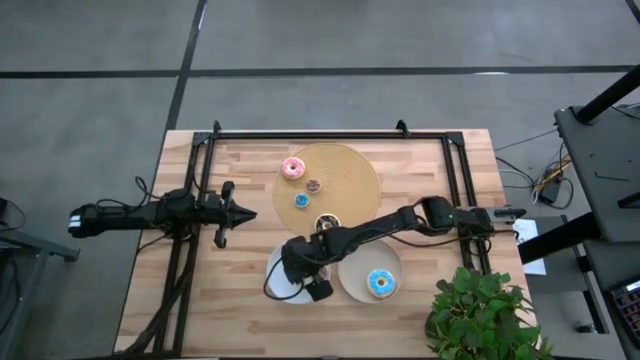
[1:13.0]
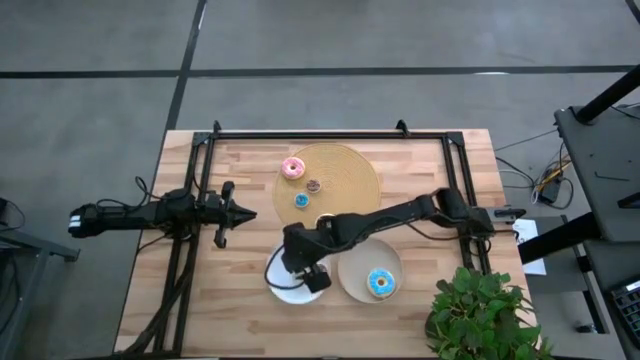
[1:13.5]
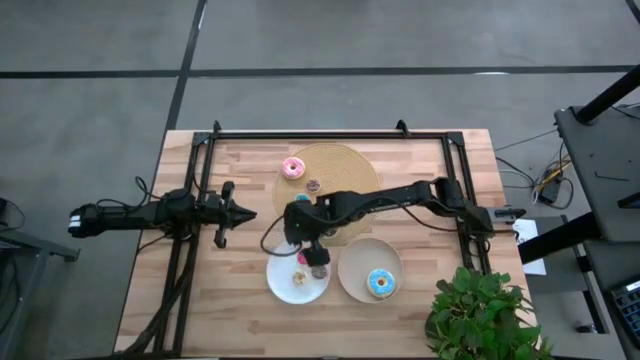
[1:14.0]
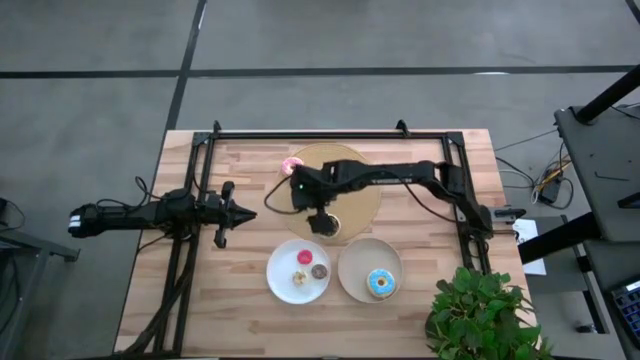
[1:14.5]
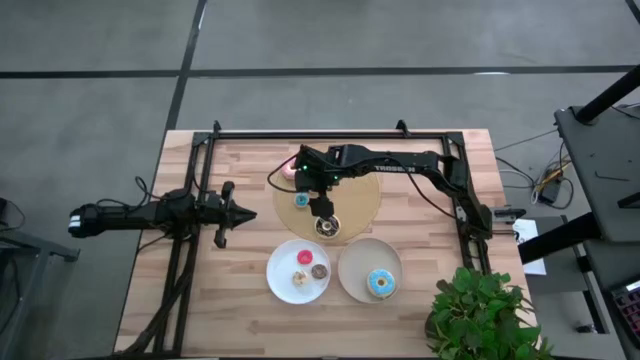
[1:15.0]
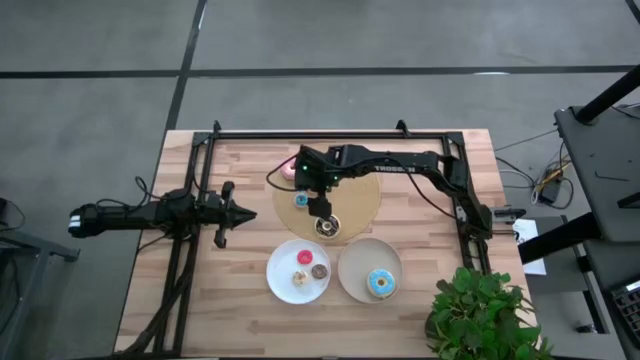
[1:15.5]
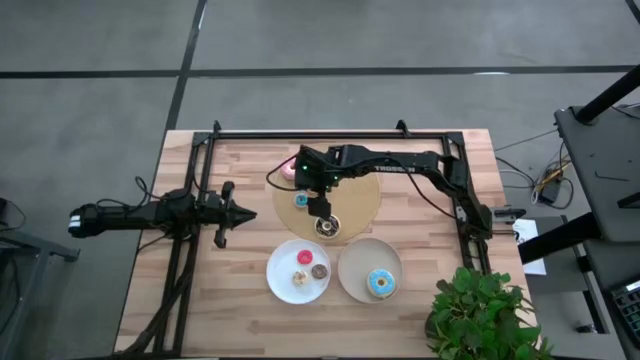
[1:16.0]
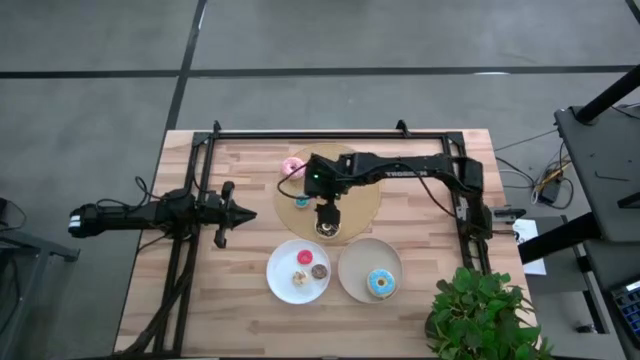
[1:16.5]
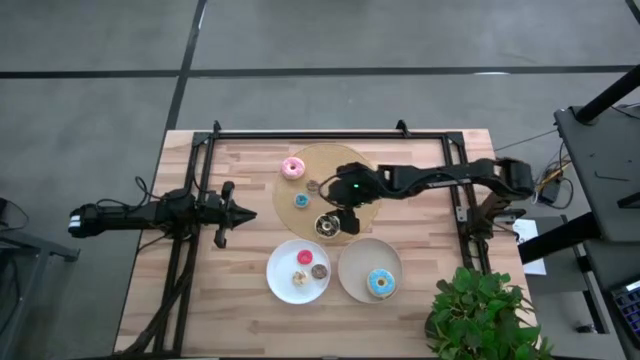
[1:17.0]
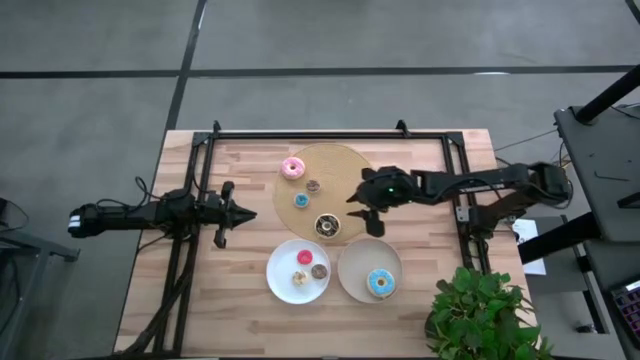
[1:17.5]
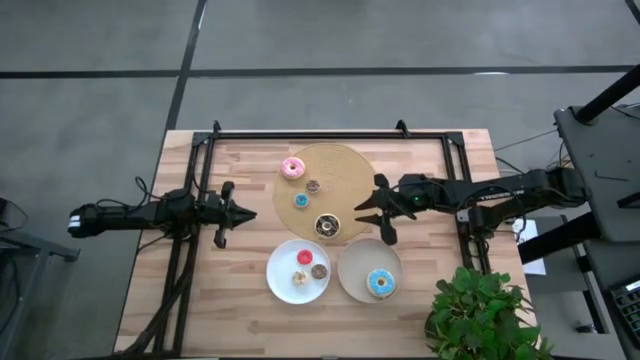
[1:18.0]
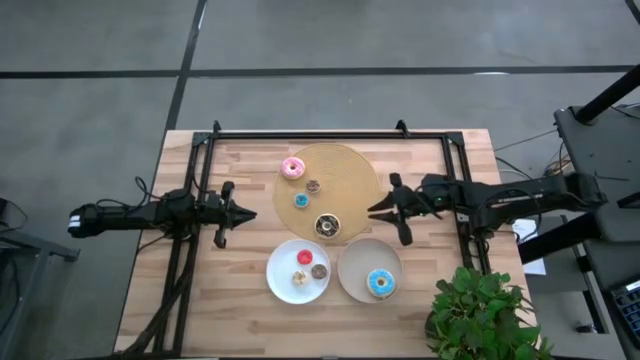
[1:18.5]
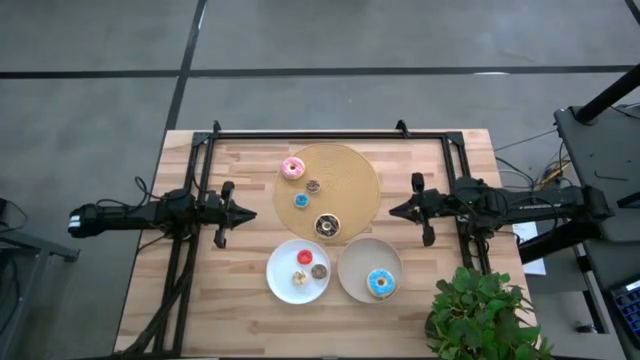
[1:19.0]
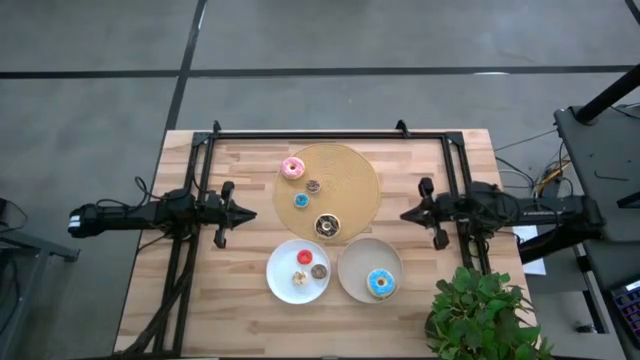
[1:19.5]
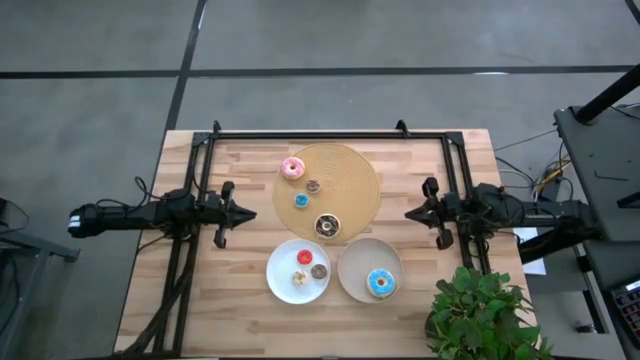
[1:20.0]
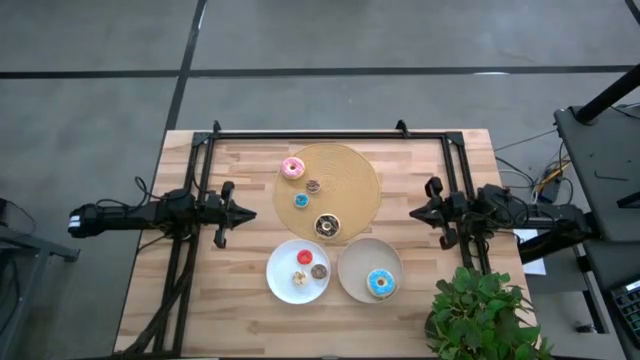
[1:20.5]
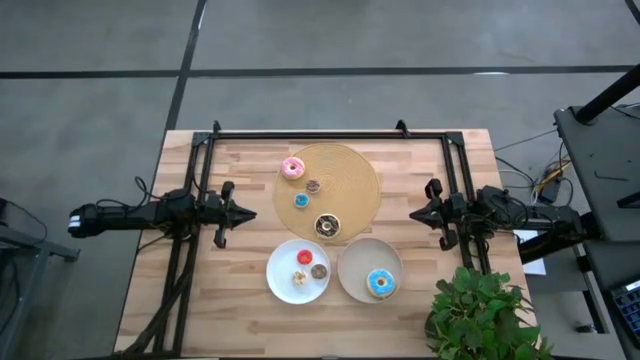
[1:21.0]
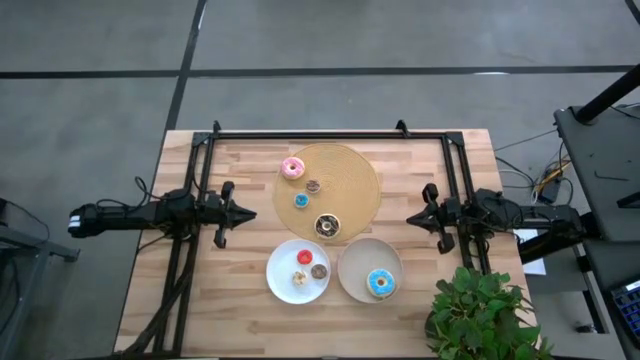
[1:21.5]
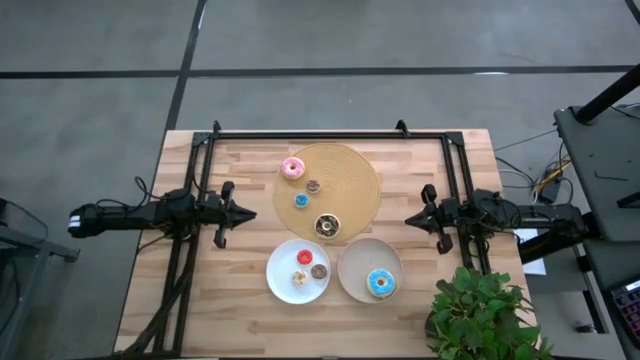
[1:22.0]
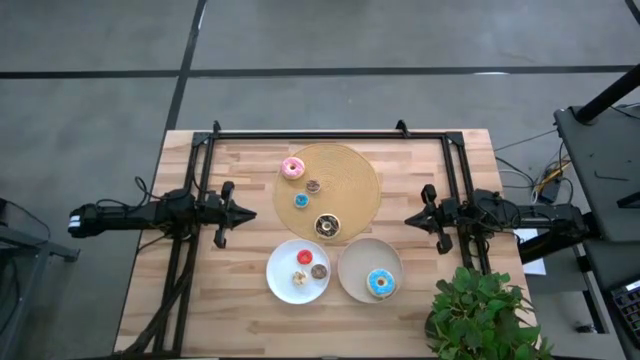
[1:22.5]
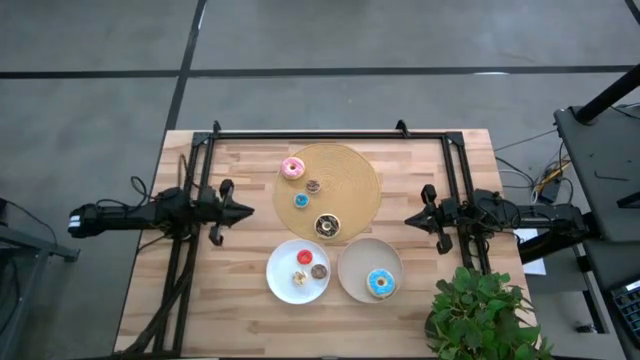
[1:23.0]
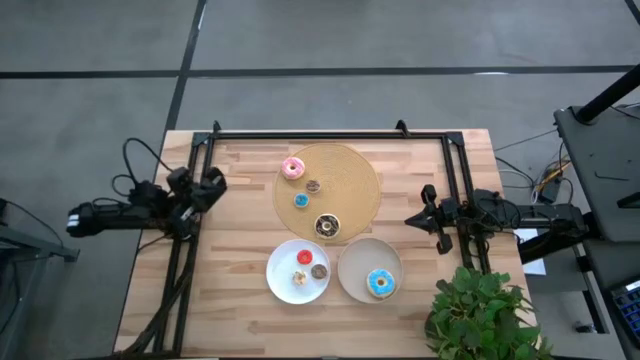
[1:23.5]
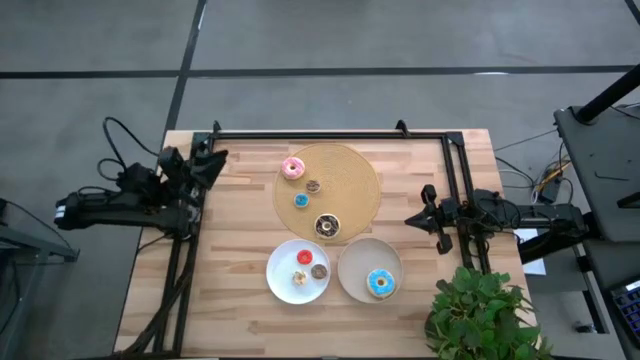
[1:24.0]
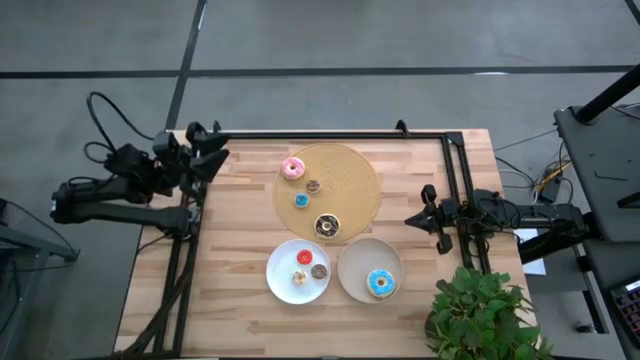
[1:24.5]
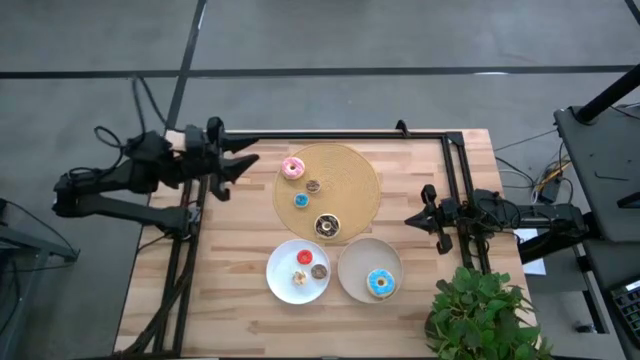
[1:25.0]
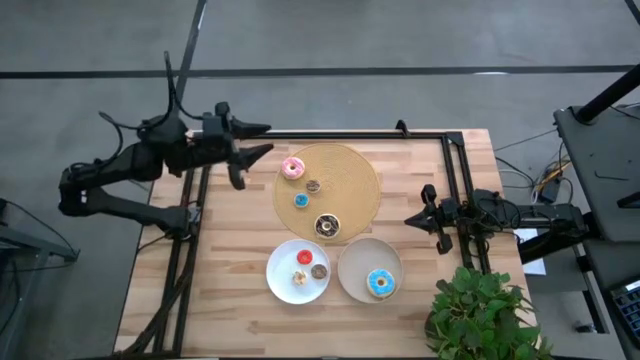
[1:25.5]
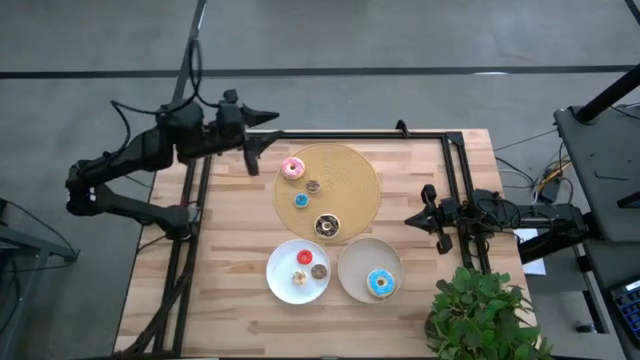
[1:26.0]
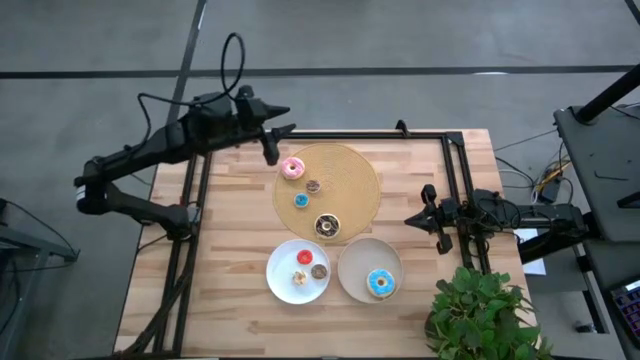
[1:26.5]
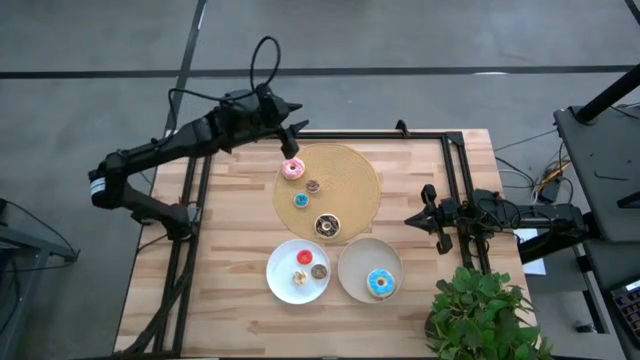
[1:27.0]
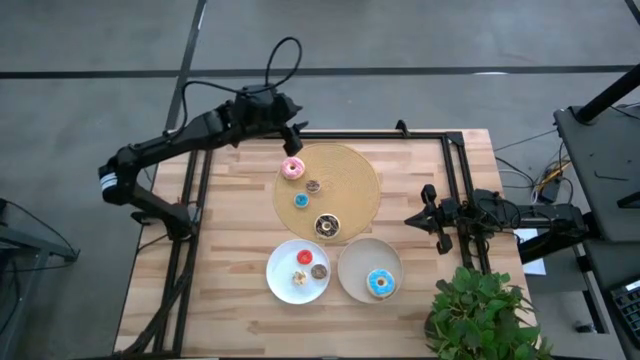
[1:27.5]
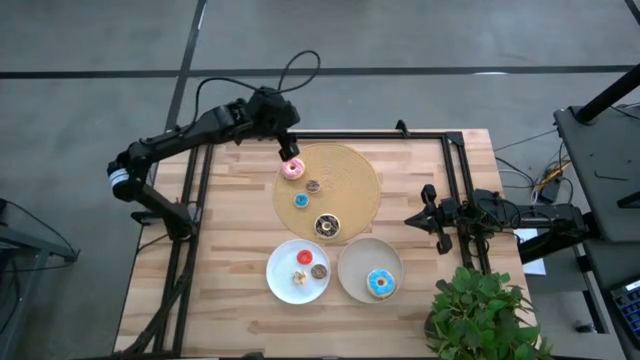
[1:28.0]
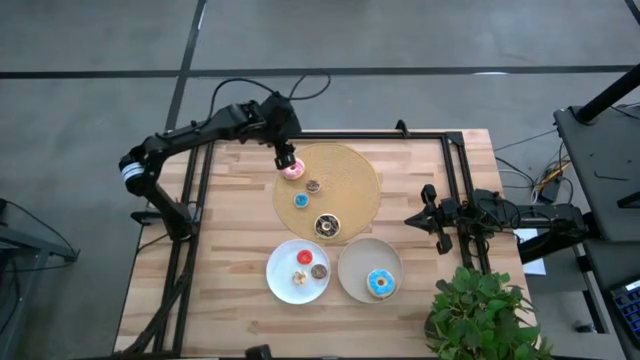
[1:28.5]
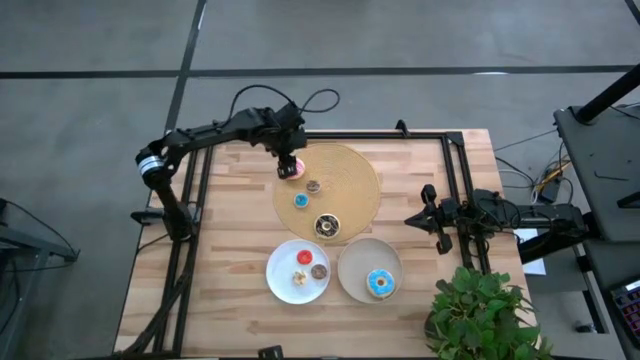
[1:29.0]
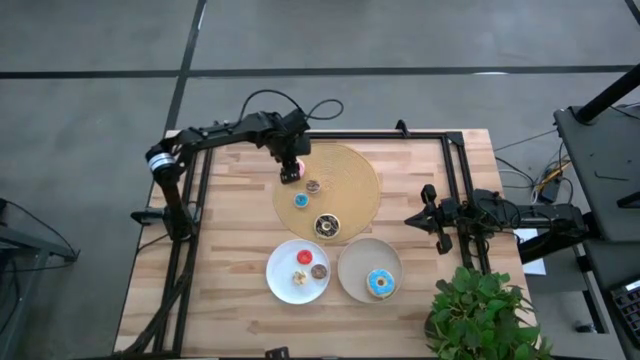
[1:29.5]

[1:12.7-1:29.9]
Task: Pick & Place donuts
Put the big pink donut on the brown plate

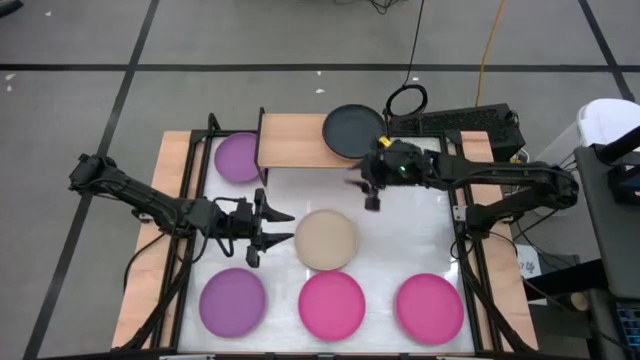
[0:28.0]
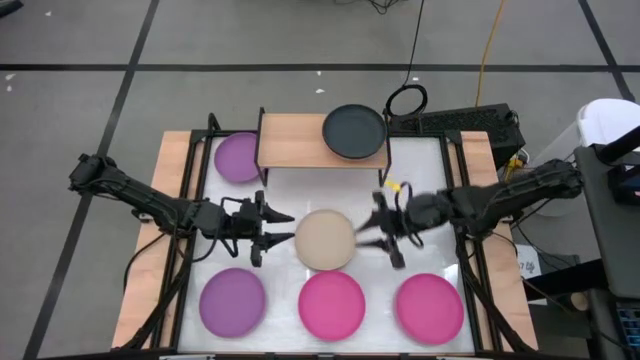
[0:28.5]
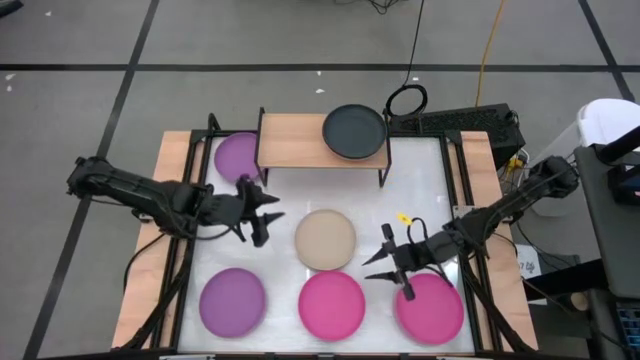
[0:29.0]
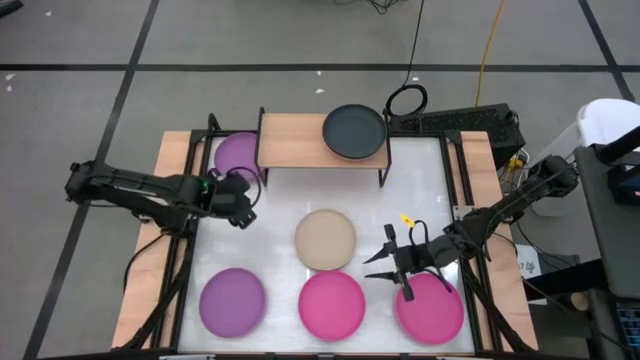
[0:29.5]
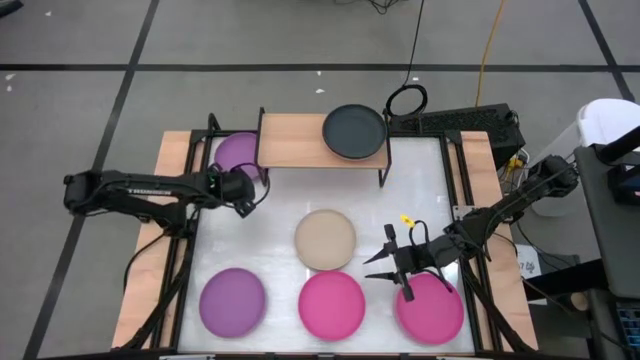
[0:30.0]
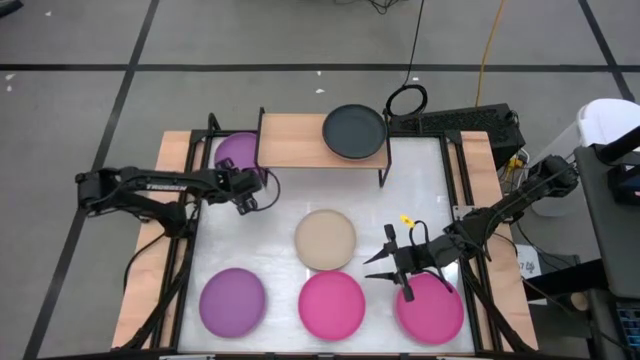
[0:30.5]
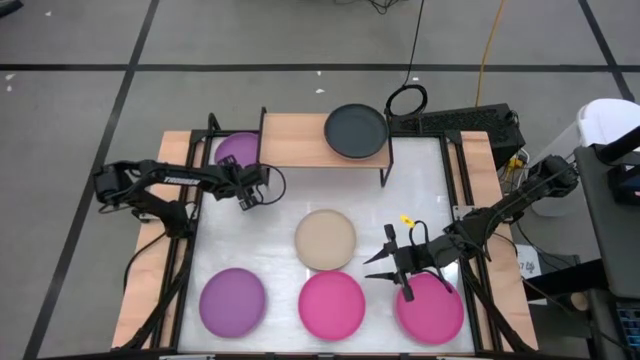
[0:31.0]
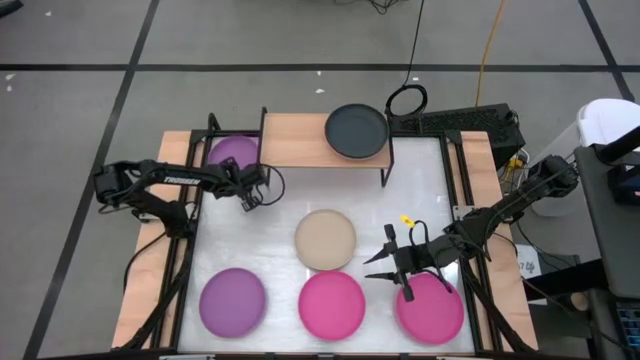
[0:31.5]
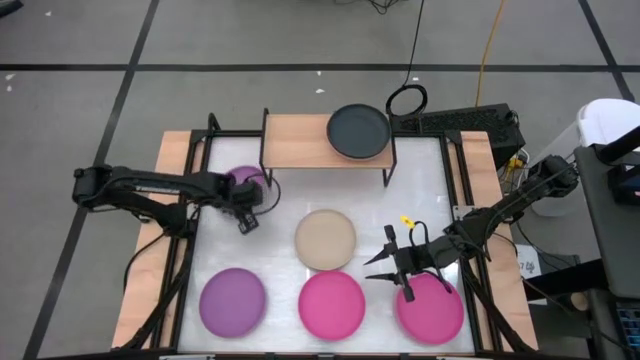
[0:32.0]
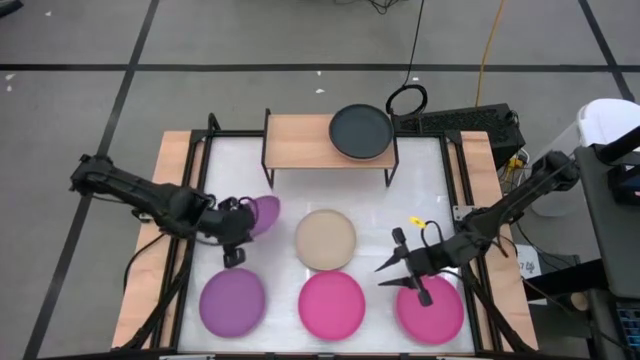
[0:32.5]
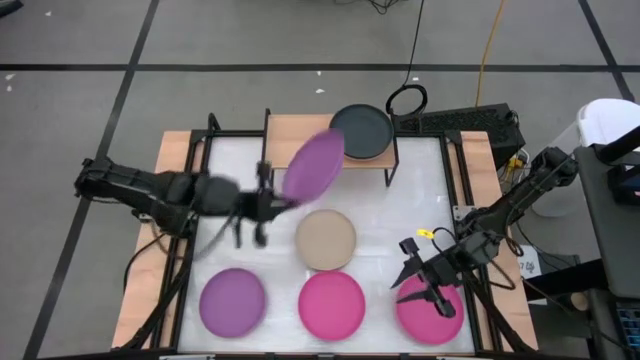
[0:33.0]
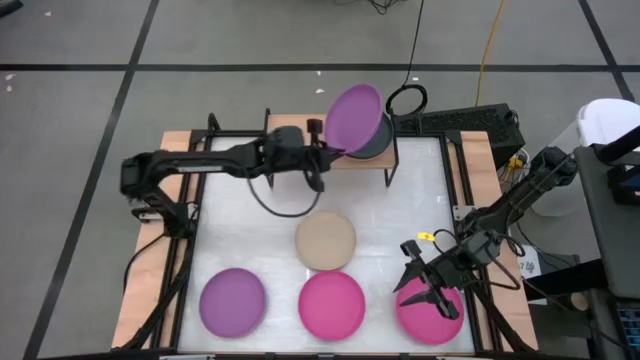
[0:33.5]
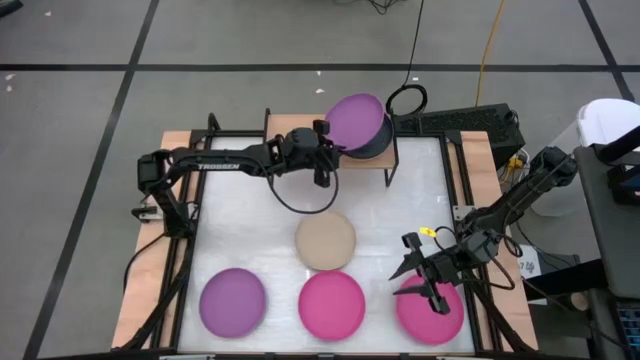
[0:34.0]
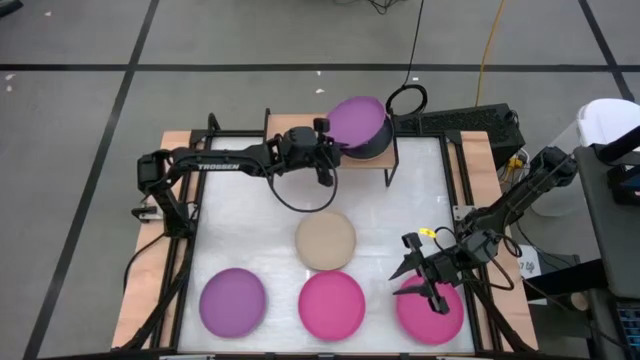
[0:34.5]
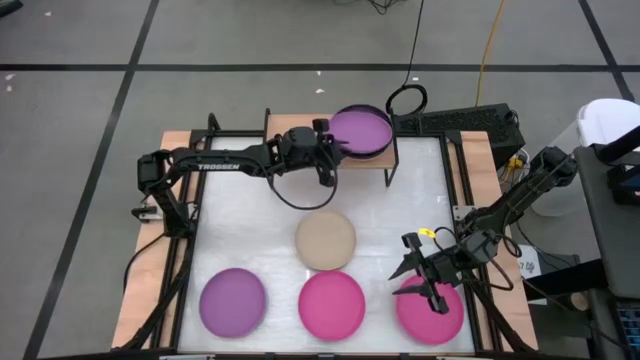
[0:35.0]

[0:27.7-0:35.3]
Task: Place and stack plates onto a shelf
Stack the top violet plate on top of the black plate on the shelf
